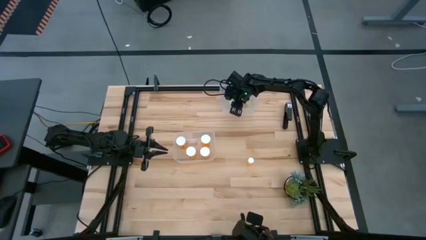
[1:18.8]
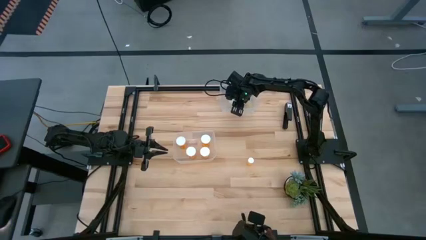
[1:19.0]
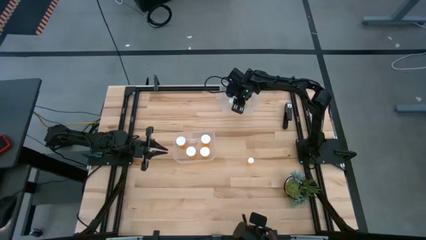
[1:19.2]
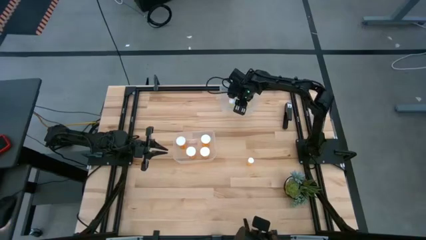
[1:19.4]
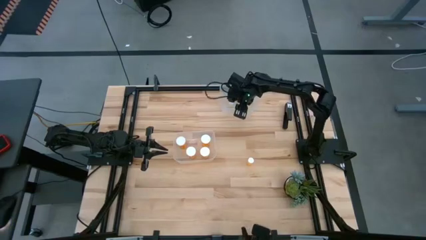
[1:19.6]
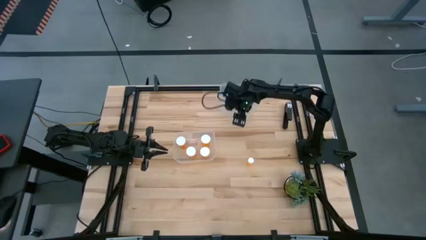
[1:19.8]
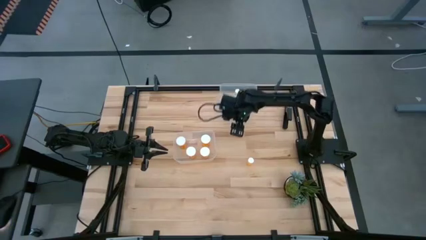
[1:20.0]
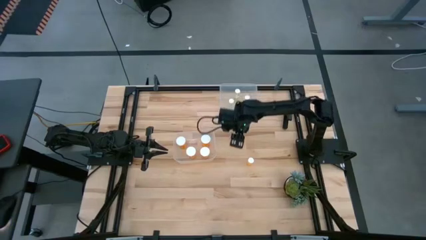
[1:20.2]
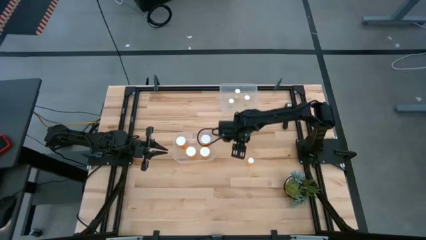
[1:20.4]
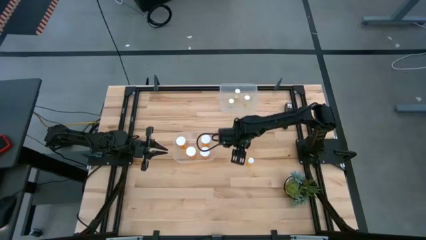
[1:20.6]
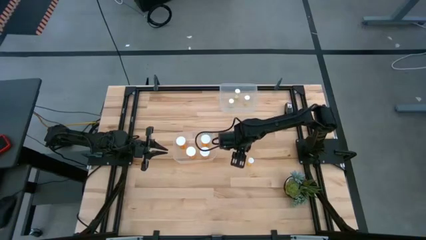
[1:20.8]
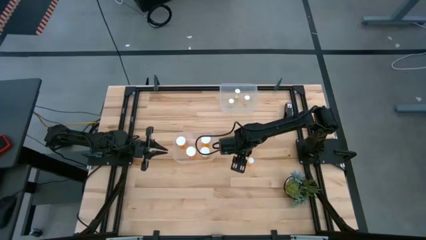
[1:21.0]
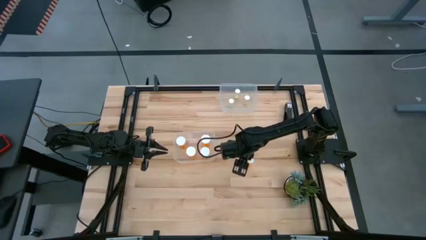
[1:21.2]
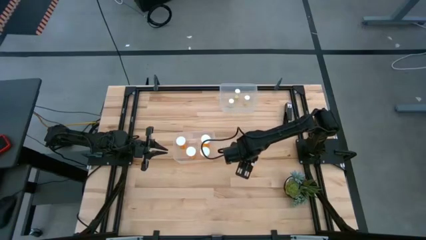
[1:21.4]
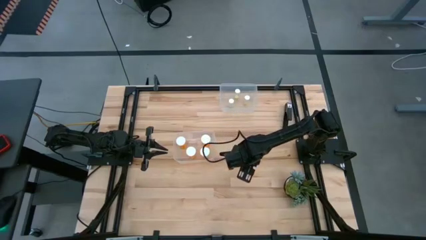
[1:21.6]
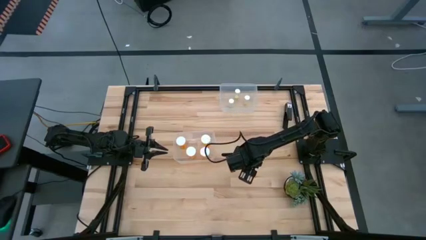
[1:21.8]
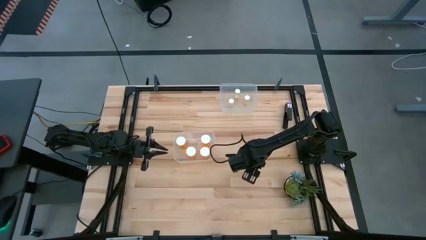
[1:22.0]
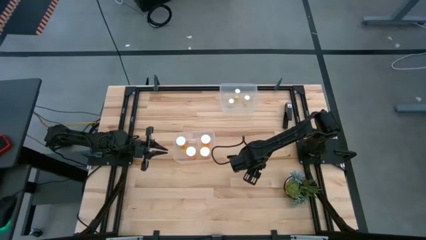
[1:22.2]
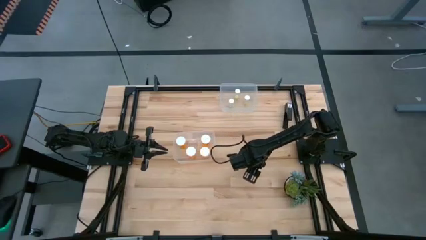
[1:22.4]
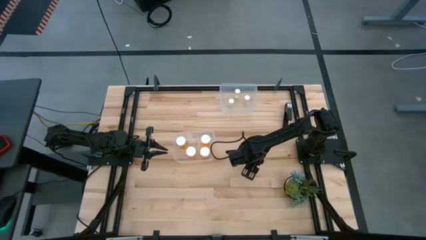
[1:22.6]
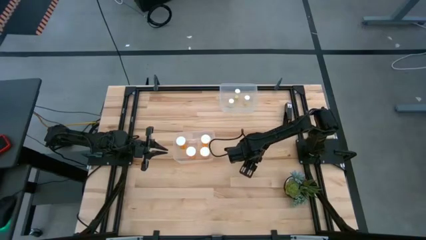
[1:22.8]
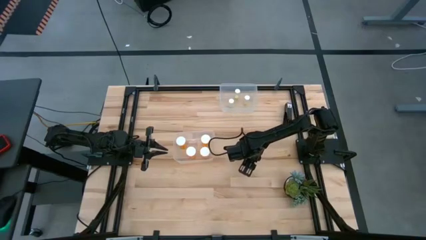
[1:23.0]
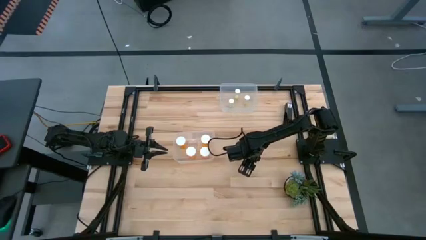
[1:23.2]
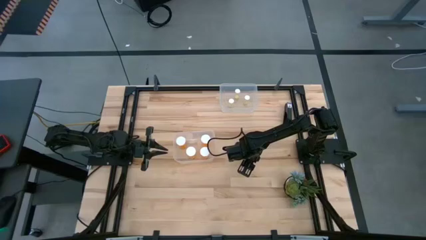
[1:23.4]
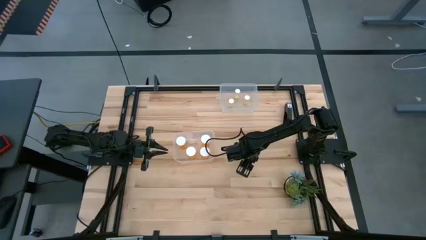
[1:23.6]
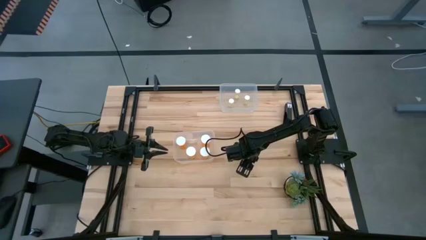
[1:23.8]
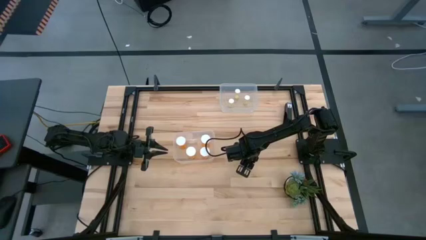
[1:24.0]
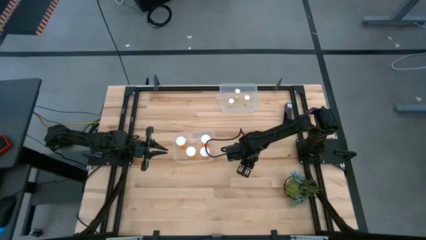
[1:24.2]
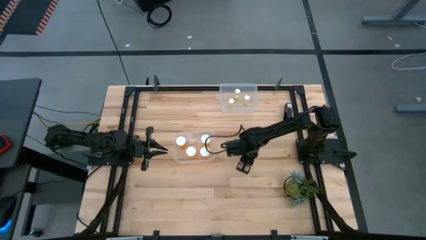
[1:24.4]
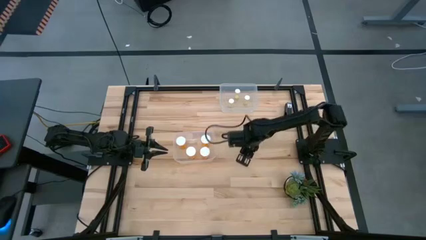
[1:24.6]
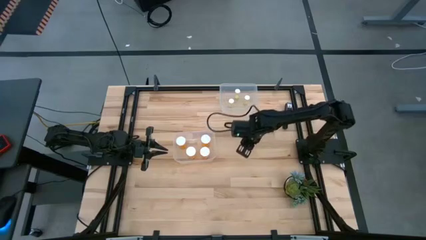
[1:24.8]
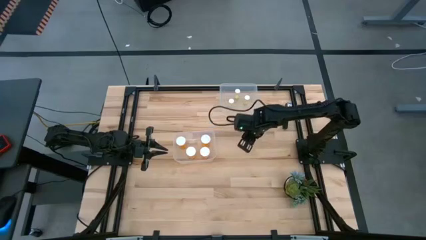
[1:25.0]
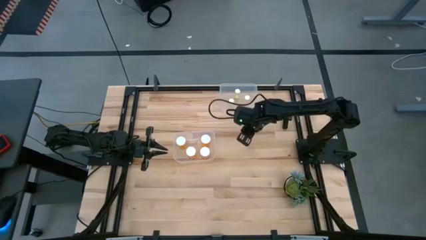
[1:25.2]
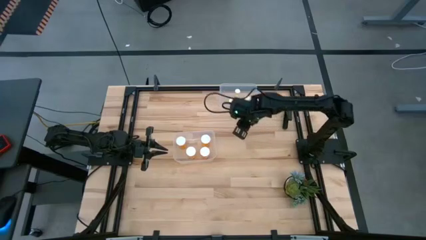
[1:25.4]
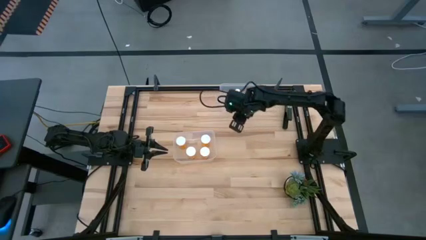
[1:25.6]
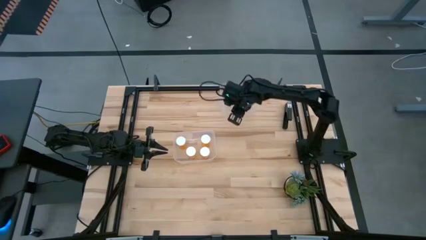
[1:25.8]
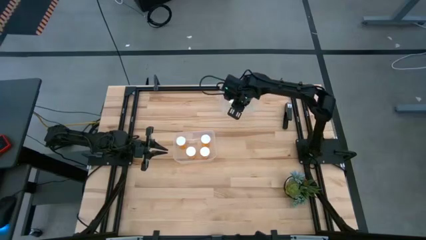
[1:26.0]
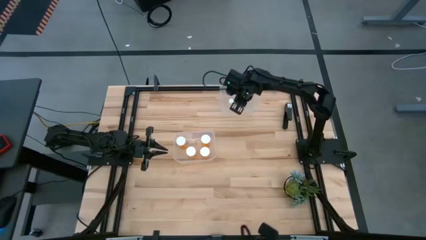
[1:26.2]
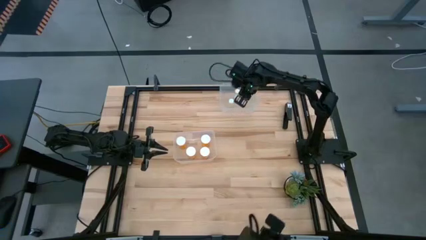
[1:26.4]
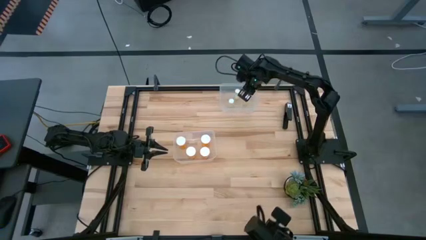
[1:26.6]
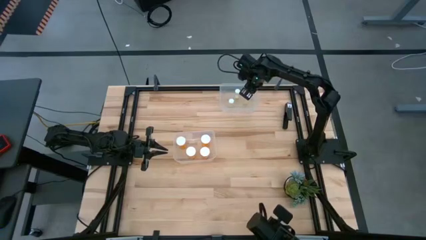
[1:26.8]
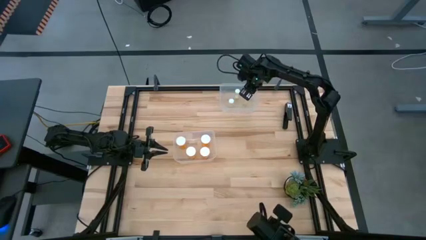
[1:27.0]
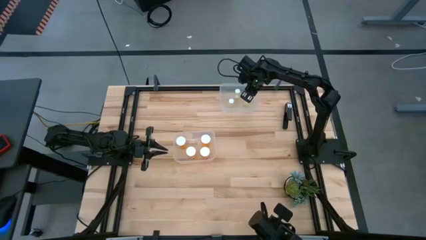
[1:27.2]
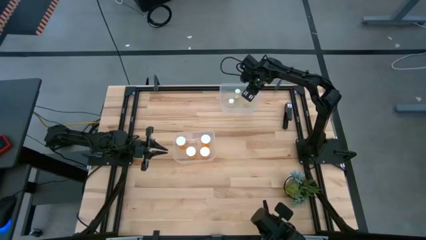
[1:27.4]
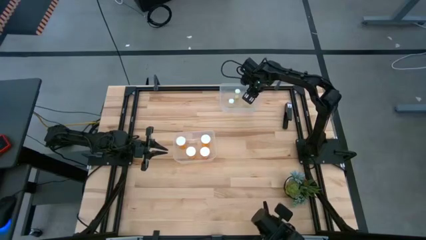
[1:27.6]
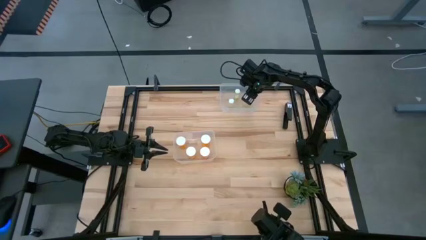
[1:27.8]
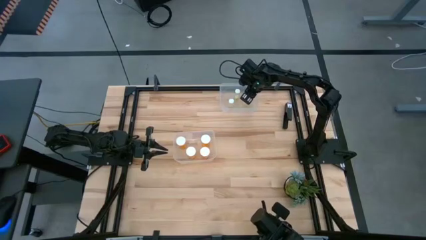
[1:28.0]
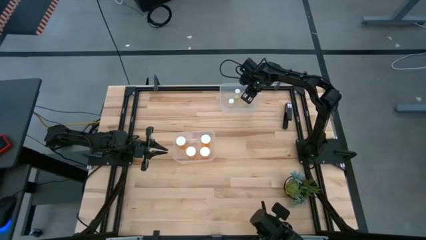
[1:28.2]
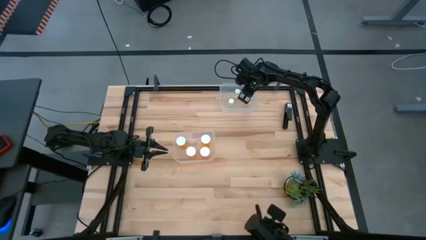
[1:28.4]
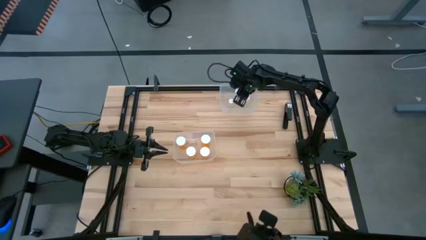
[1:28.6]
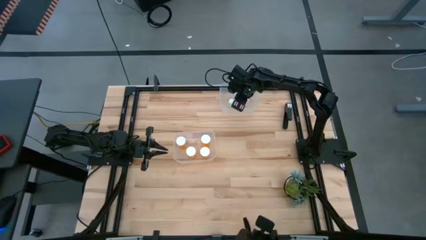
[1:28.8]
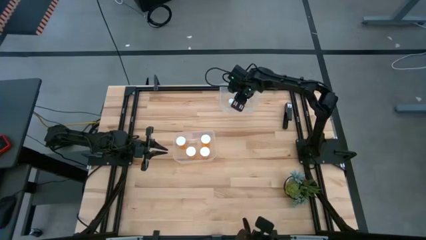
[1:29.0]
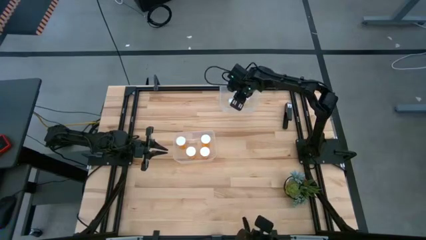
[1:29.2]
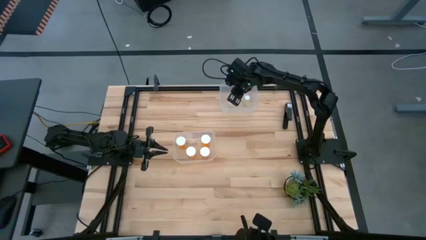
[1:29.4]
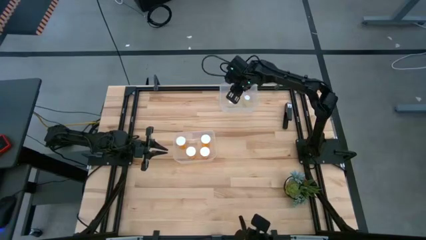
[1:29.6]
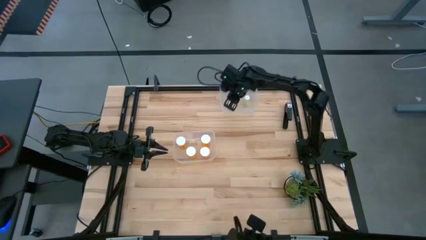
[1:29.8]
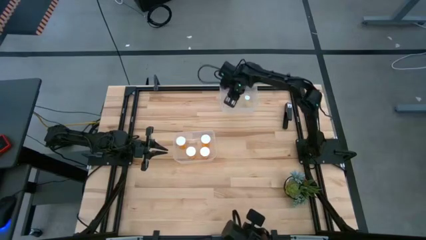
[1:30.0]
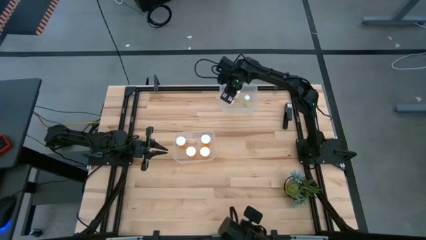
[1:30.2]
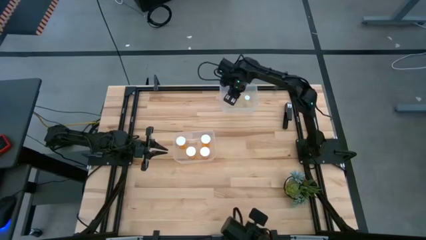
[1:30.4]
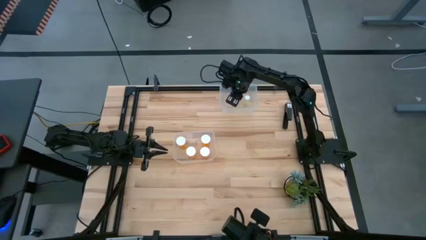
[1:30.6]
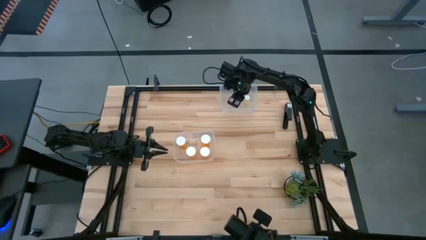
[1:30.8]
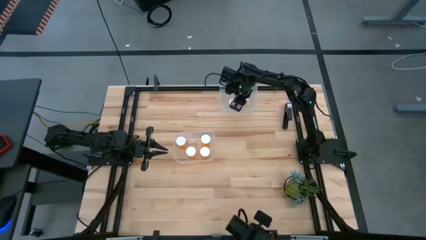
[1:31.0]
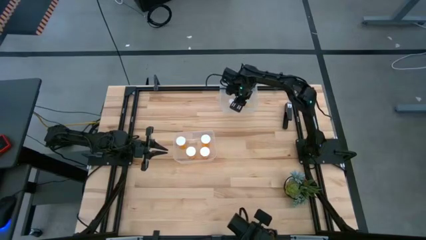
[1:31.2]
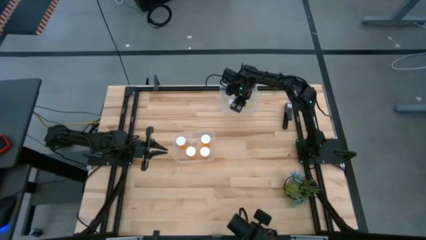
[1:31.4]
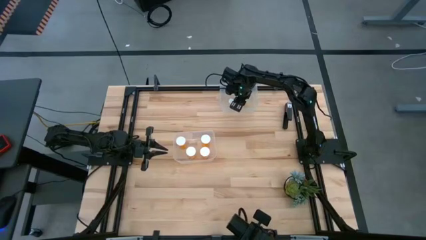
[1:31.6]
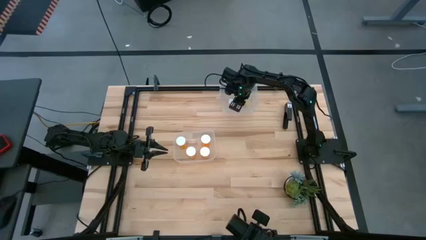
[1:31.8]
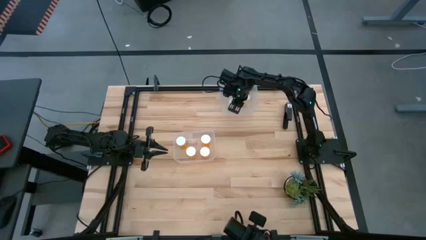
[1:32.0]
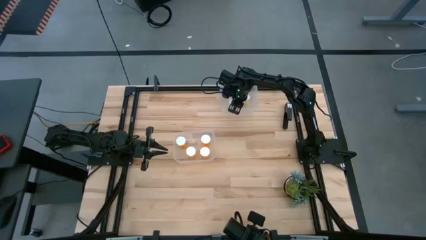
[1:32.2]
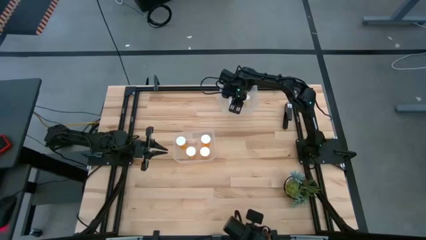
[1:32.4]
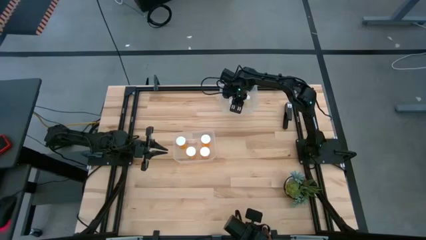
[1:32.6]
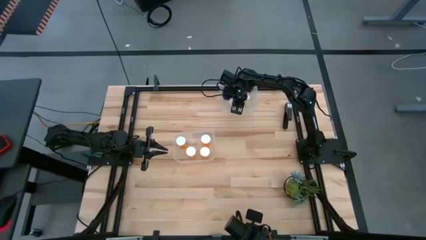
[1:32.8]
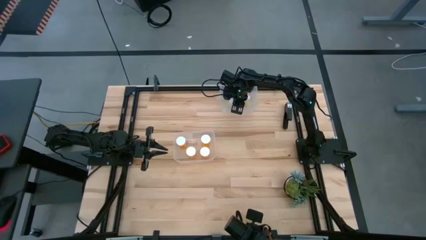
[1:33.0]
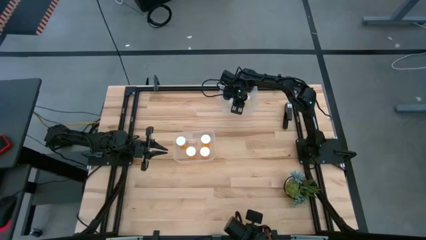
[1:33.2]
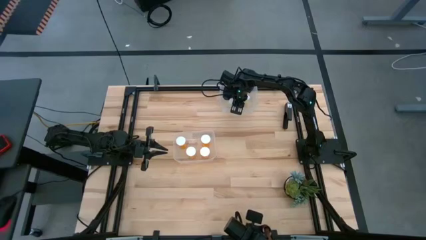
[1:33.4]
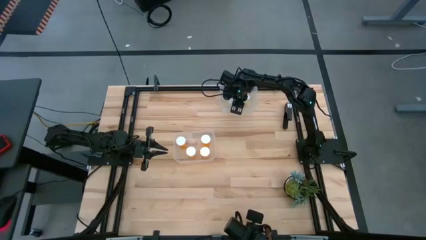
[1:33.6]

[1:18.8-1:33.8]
Task: Pick and place medicine bottles into bin by pill shape (circle, oval)
Put the small orange pill bottle into the top transparent bin
